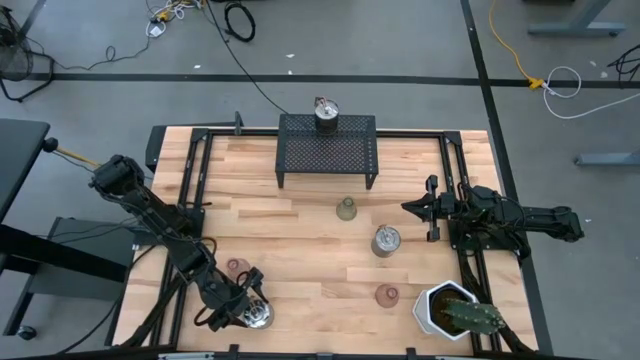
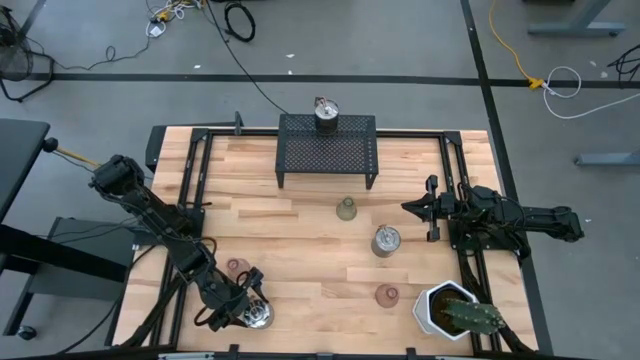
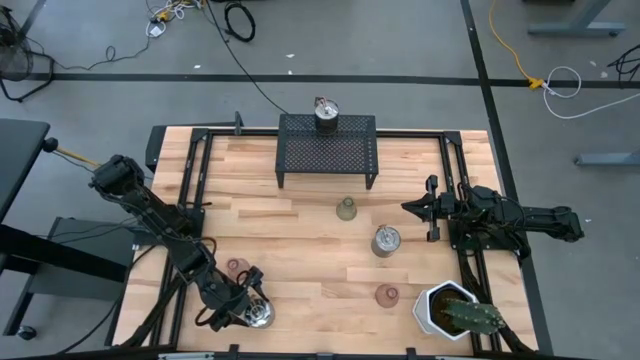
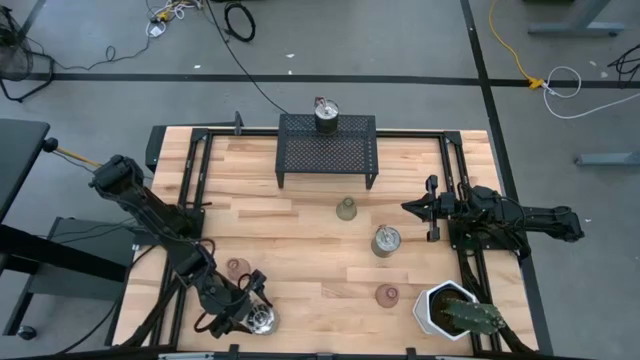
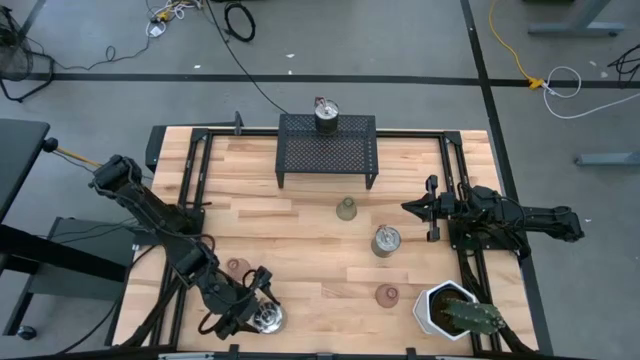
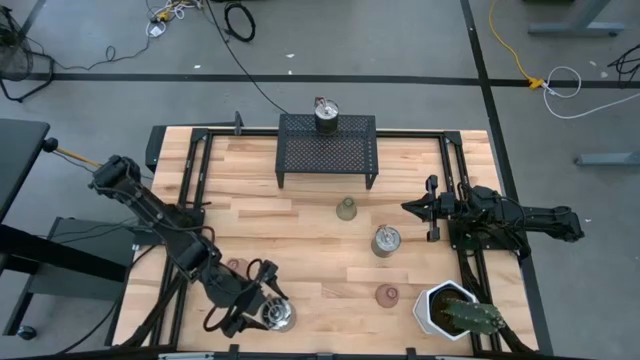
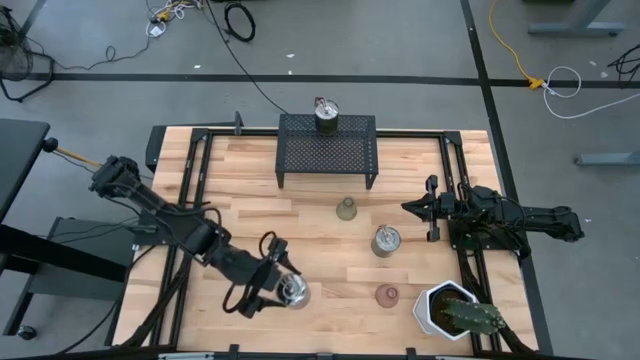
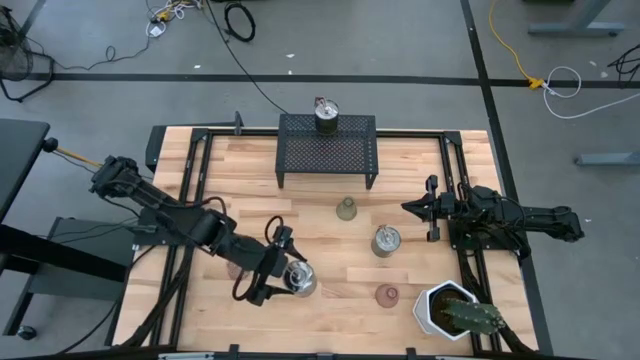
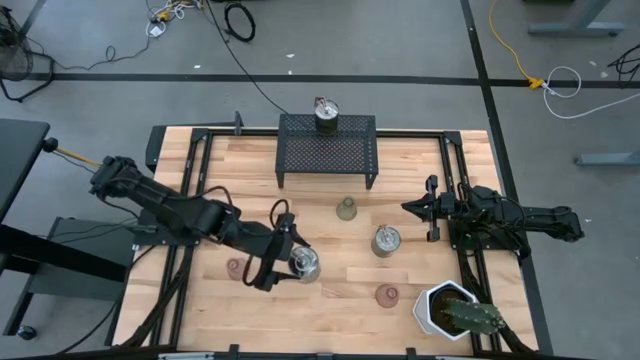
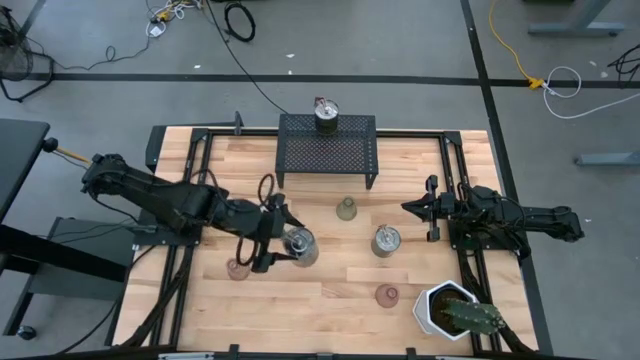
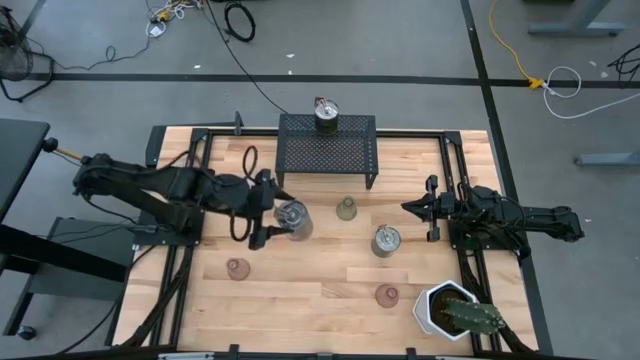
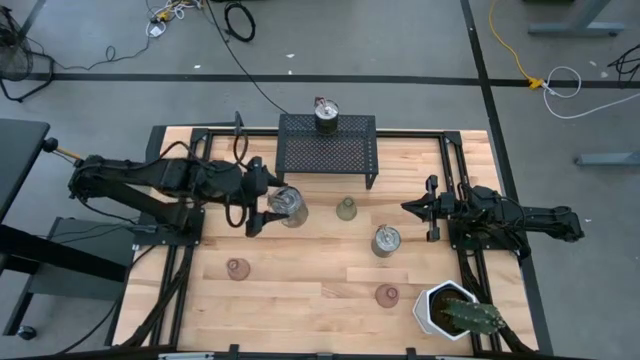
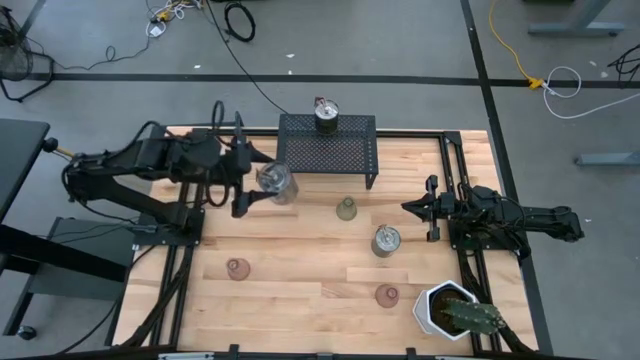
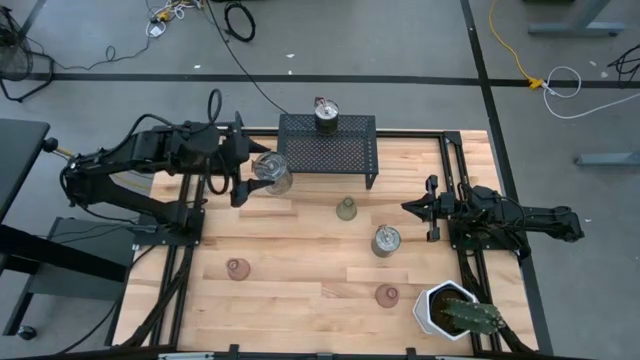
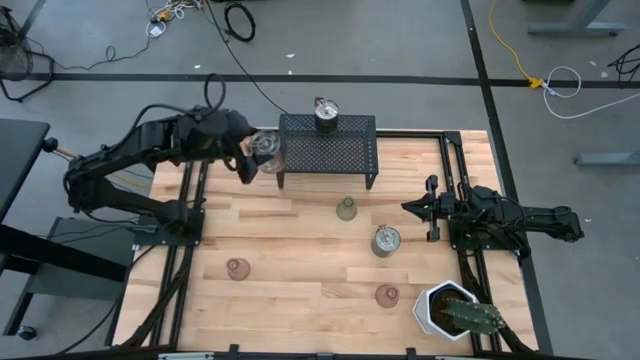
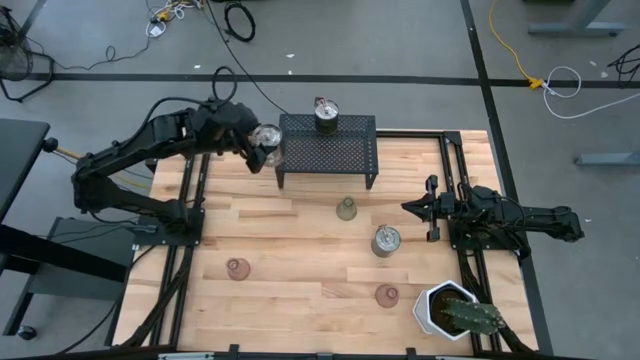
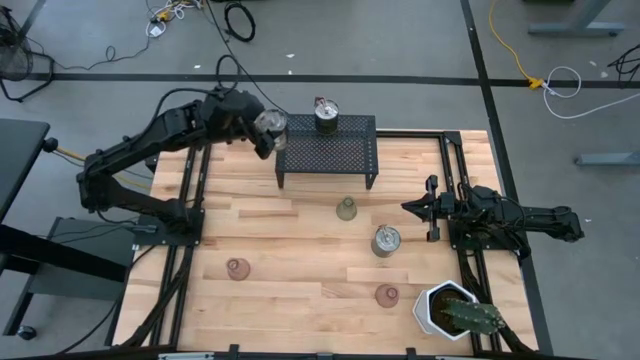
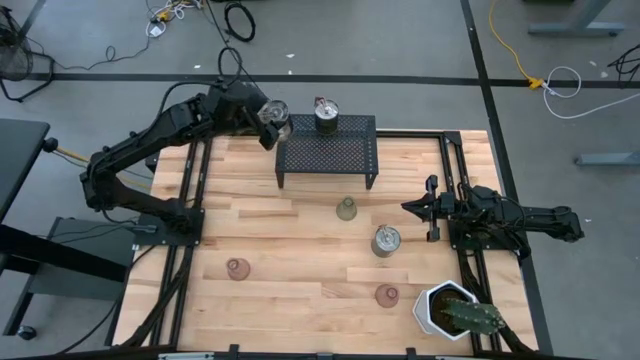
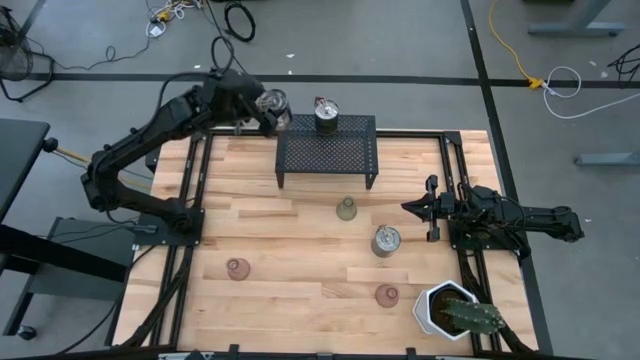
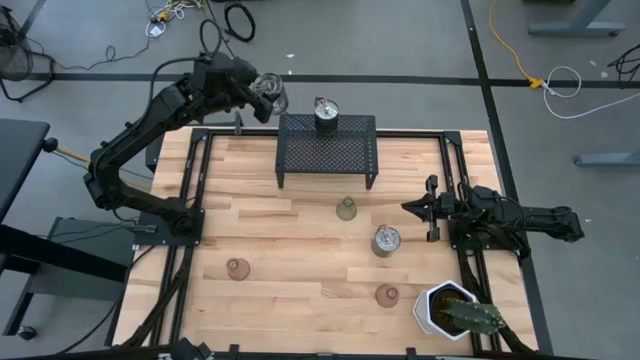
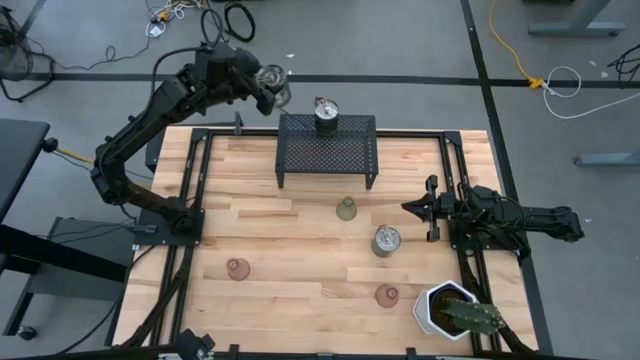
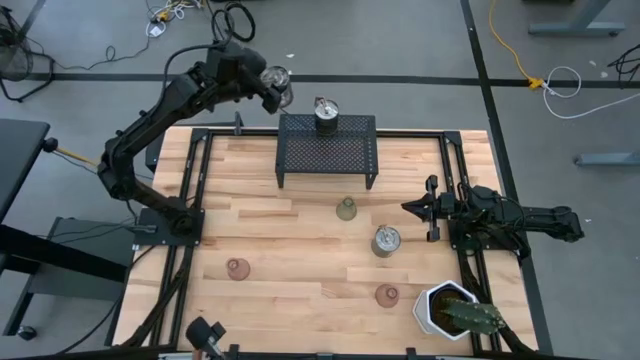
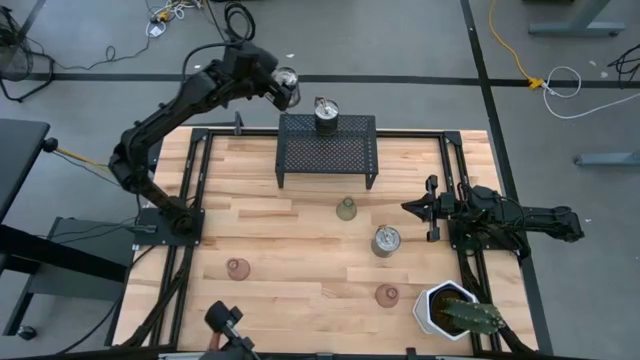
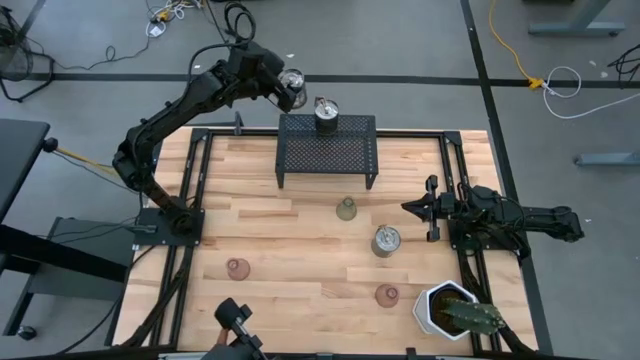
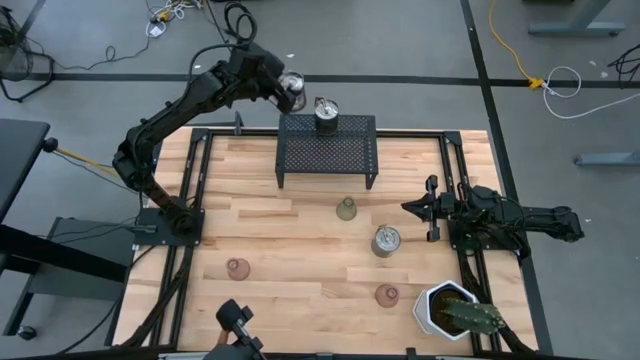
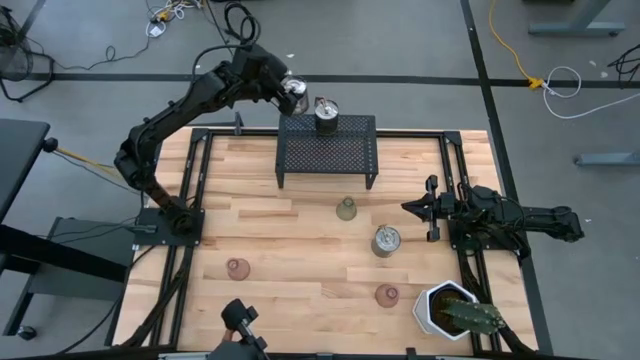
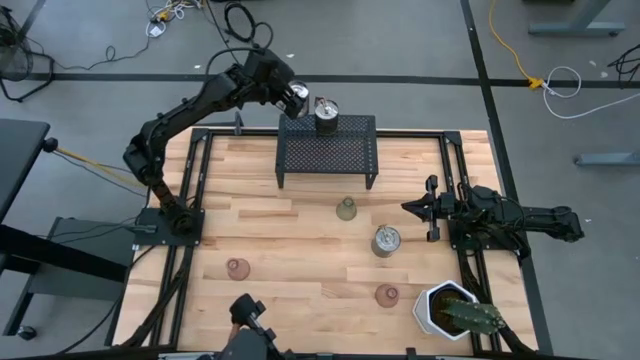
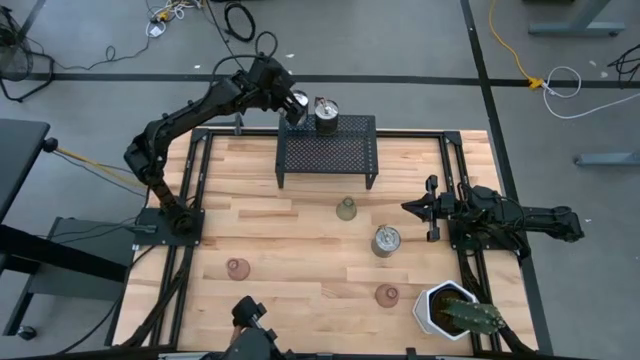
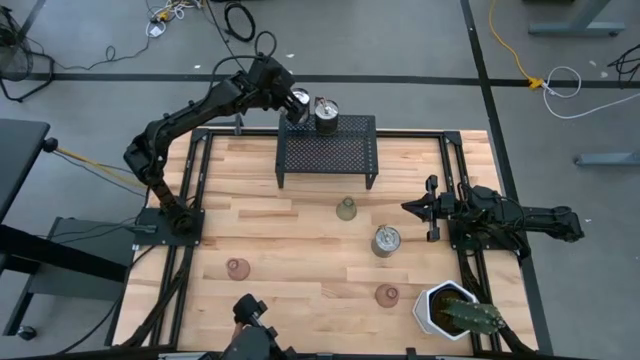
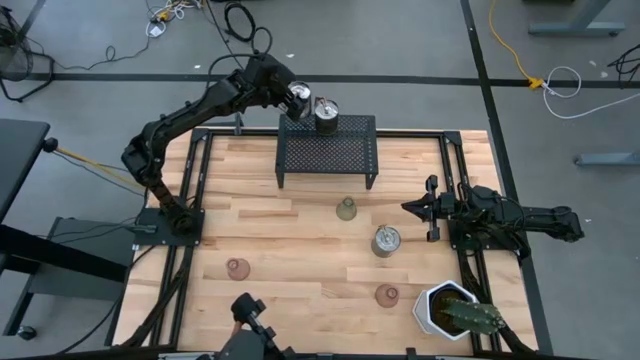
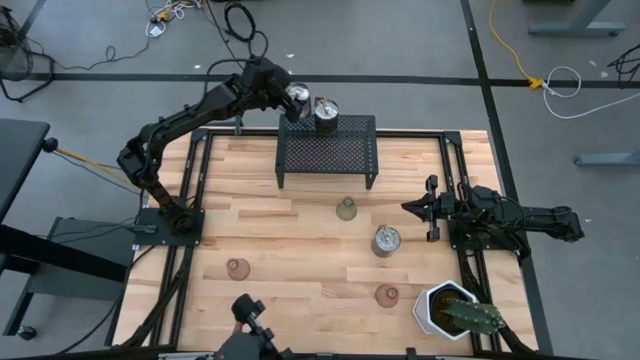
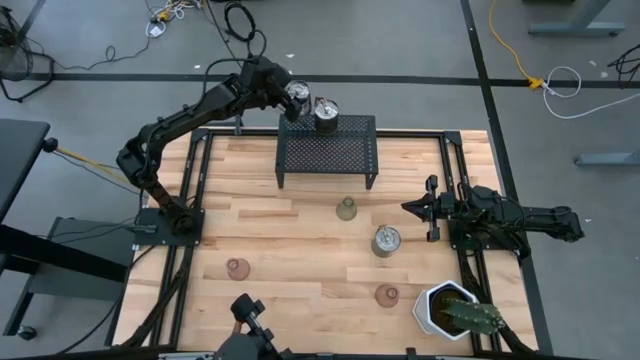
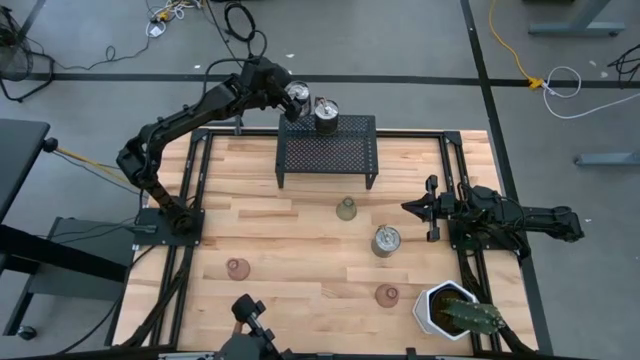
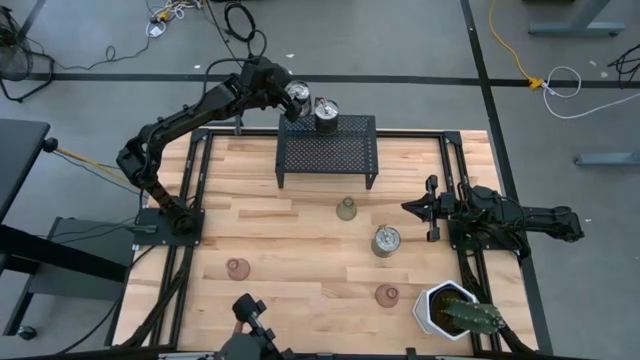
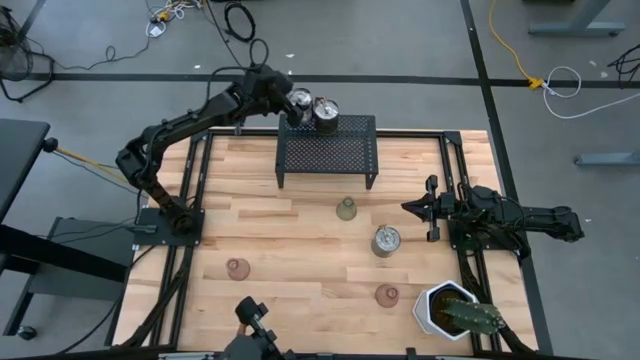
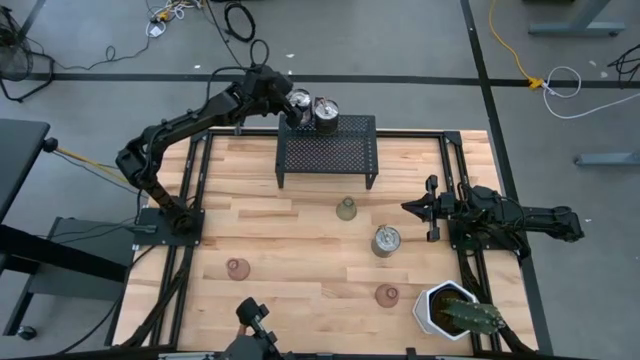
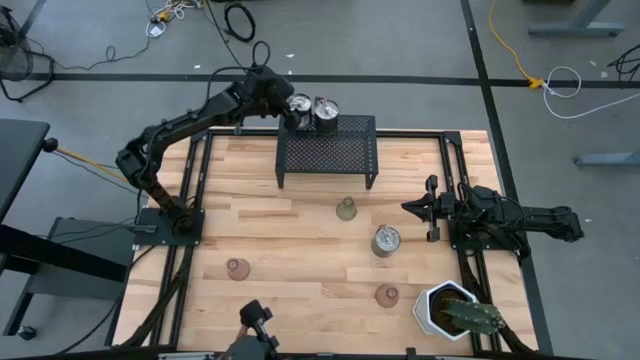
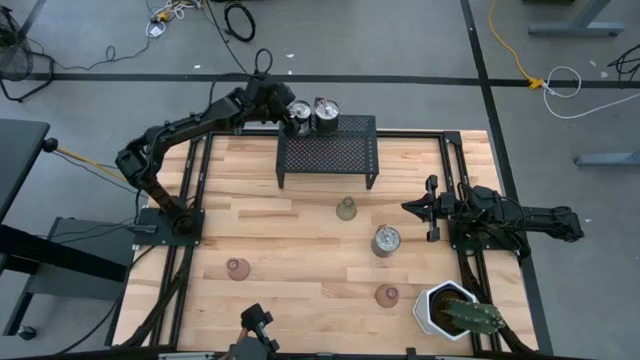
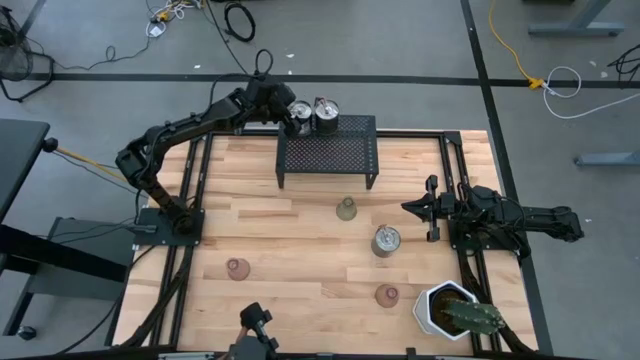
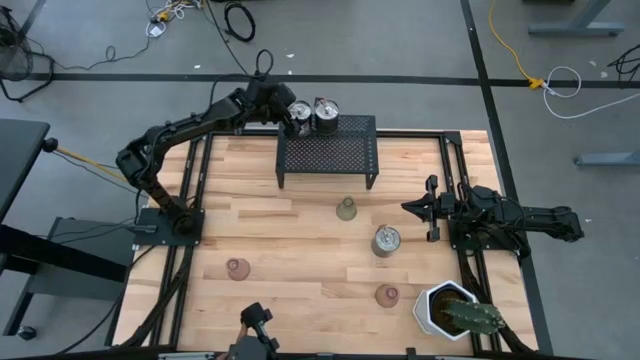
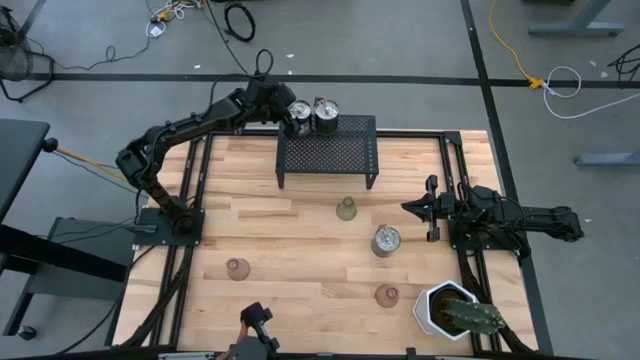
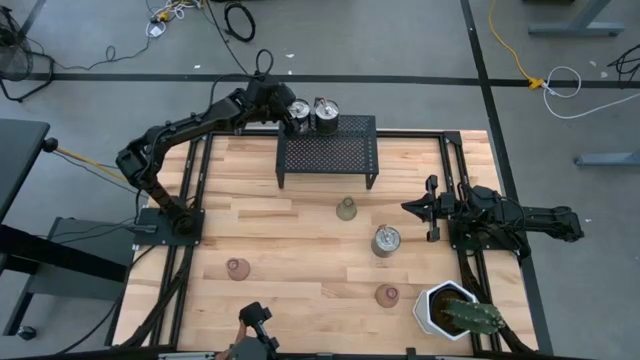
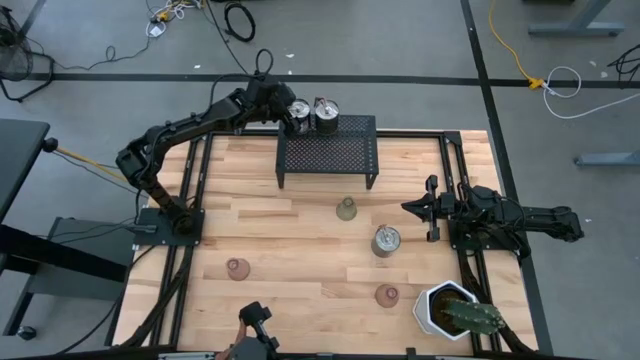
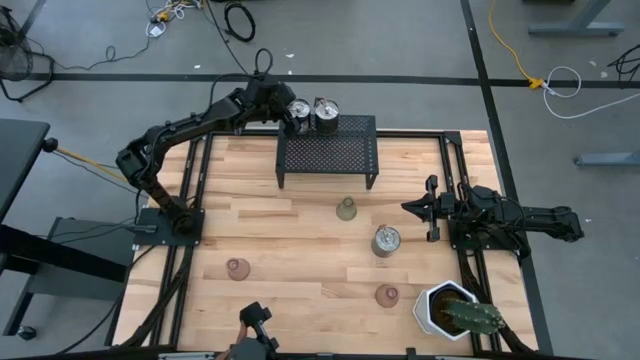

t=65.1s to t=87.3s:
Task: Pick & Place candle stick holders
Put the bottom silver scented candle on the shelf
